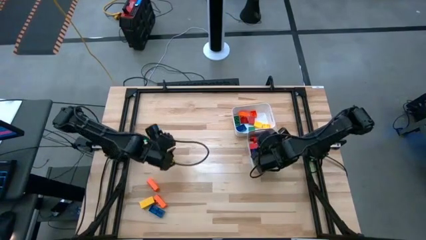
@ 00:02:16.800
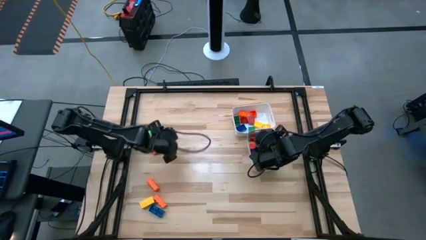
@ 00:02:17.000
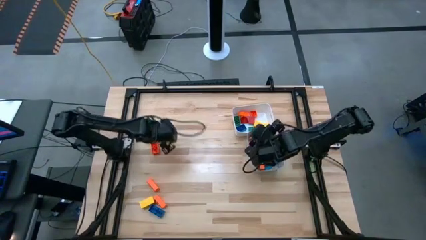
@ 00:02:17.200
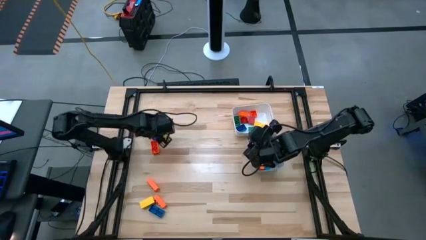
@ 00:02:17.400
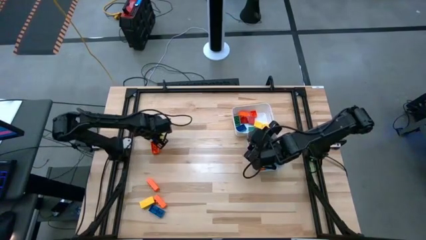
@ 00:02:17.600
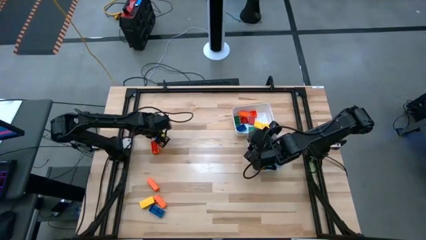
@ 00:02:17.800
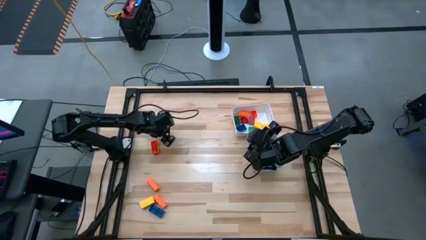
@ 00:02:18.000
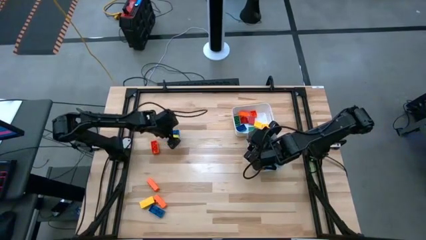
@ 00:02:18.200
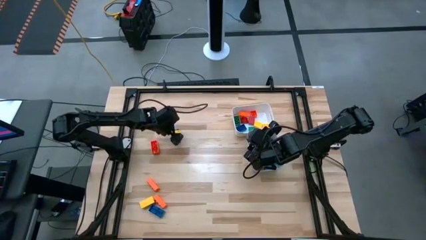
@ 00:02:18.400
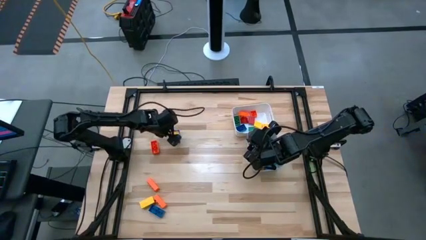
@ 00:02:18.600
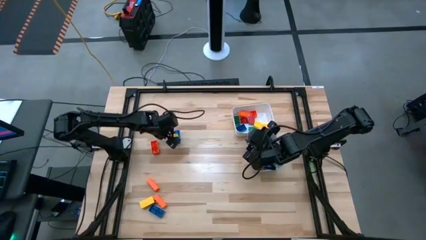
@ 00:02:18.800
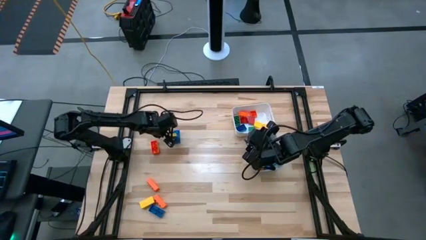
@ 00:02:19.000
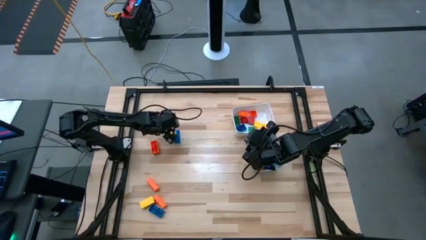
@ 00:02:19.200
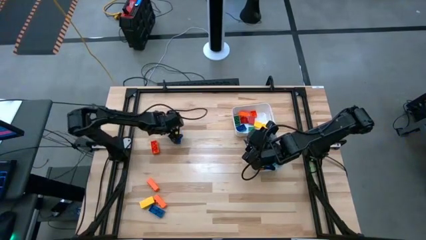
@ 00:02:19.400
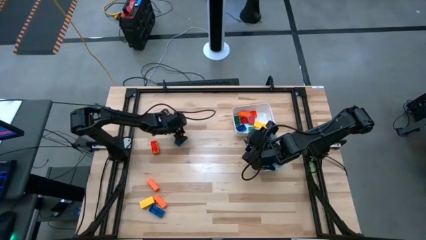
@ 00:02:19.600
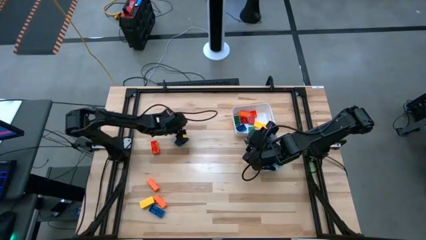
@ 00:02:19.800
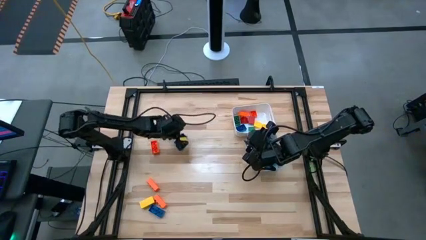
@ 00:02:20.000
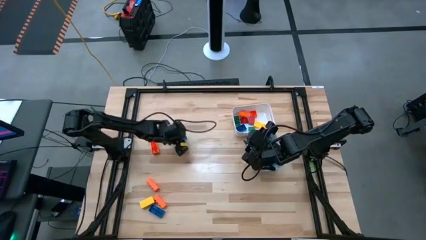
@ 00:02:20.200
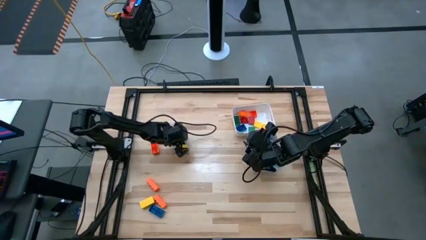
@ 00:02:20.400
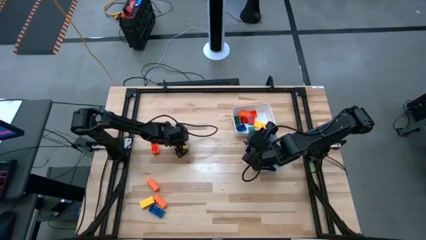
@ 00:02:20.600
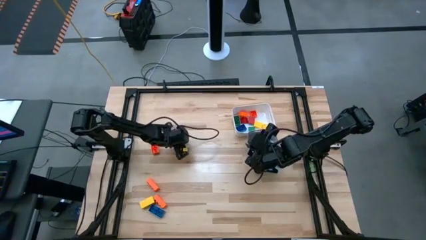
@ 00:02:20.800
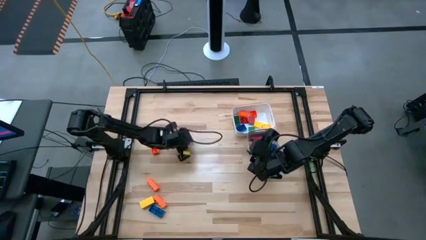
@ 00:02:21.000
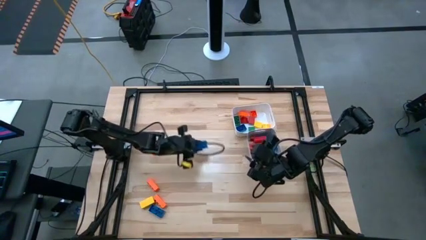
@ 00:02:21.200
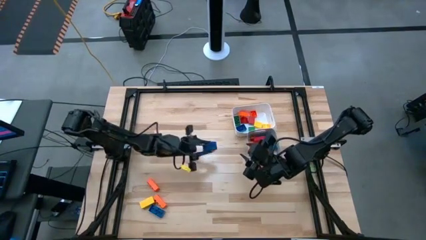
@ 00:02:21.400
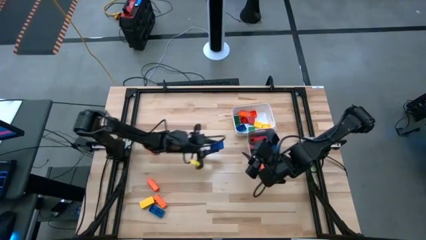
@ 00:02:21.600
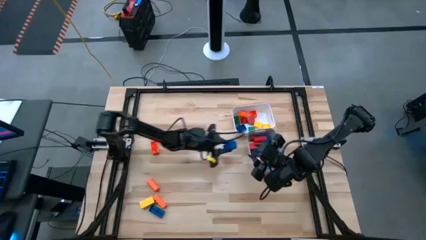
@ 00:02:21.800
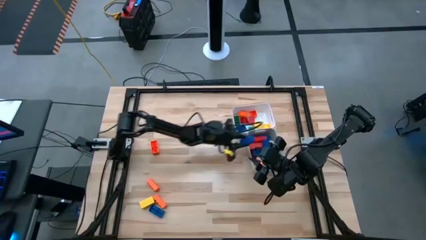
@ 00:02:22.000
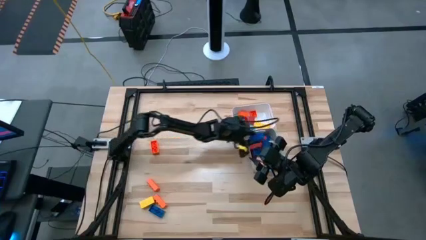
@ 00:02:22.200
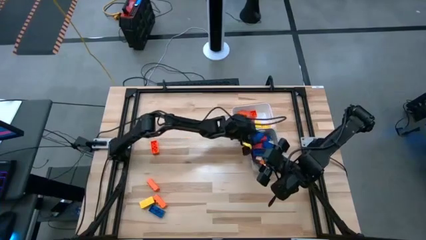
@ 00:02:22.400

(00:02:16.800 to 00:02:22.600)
Task: Sort blocks by size
Put the large blue game piece into the gray bin

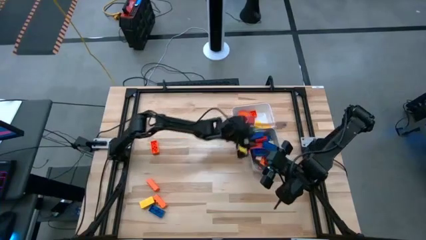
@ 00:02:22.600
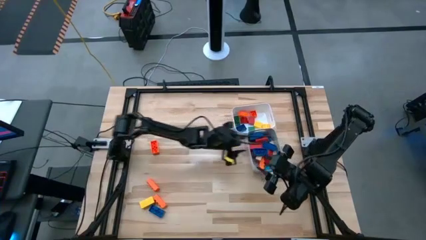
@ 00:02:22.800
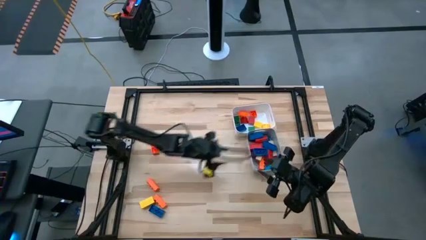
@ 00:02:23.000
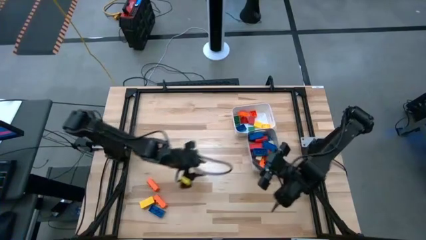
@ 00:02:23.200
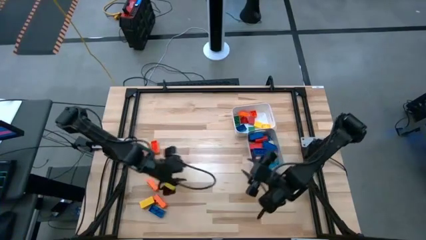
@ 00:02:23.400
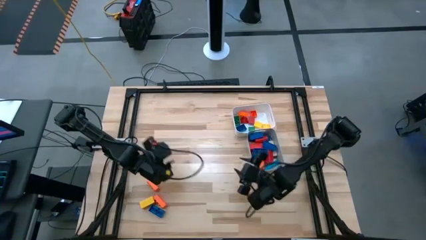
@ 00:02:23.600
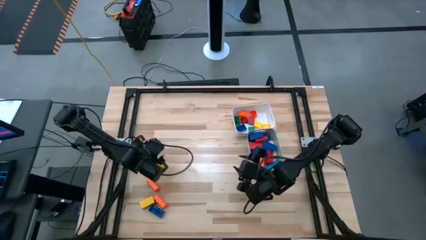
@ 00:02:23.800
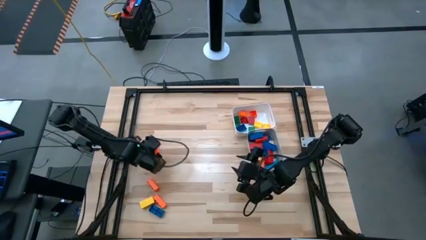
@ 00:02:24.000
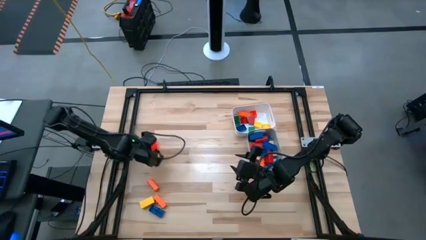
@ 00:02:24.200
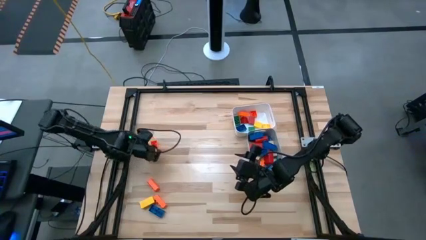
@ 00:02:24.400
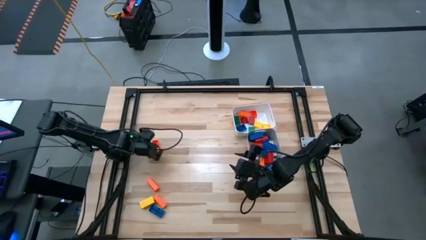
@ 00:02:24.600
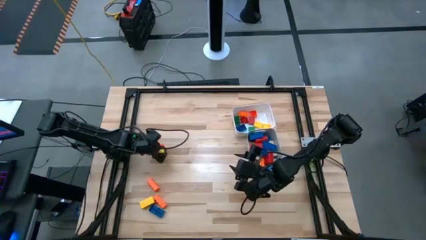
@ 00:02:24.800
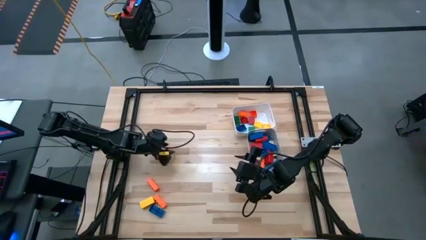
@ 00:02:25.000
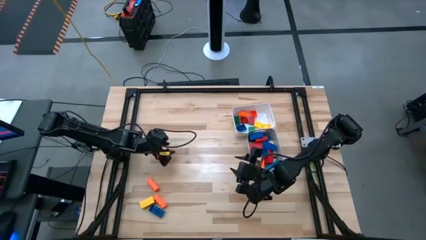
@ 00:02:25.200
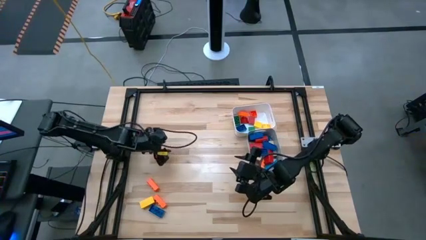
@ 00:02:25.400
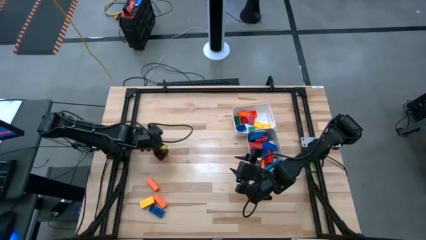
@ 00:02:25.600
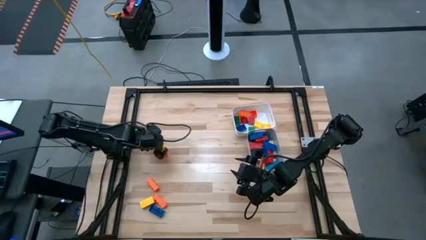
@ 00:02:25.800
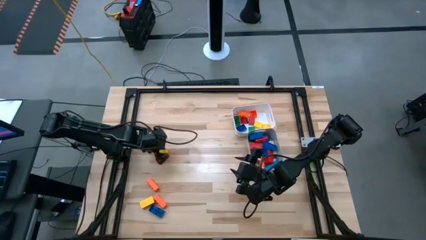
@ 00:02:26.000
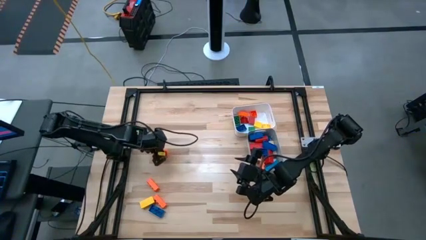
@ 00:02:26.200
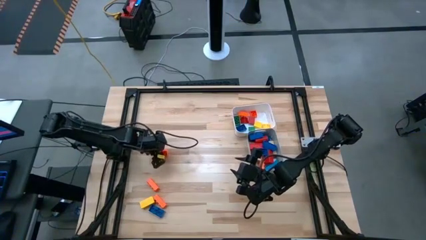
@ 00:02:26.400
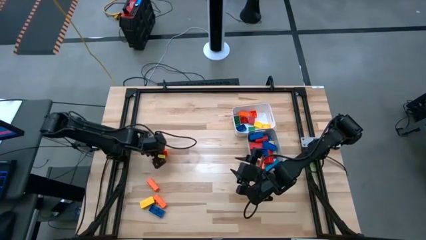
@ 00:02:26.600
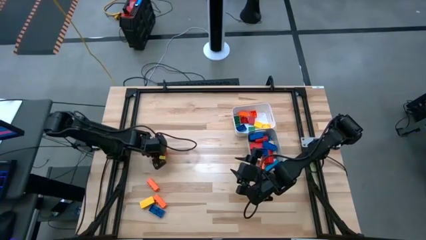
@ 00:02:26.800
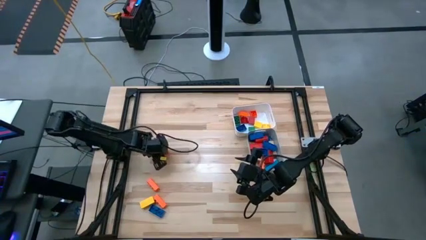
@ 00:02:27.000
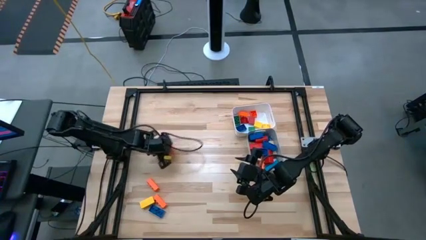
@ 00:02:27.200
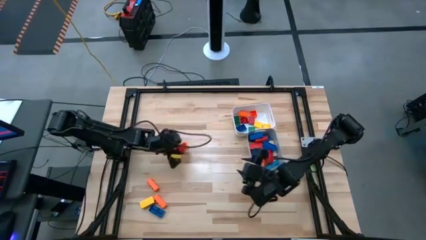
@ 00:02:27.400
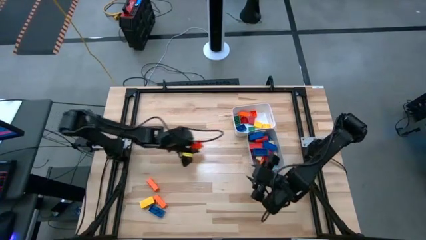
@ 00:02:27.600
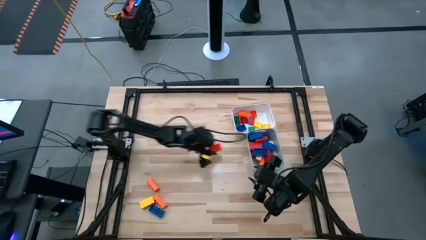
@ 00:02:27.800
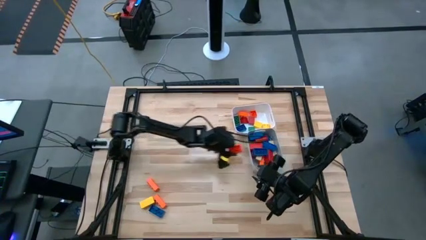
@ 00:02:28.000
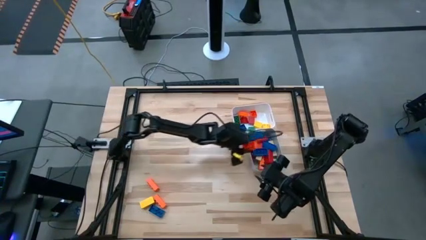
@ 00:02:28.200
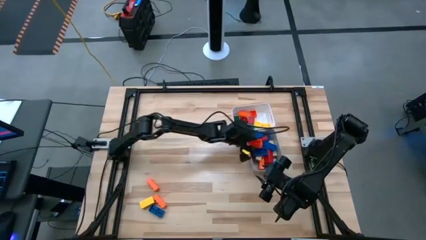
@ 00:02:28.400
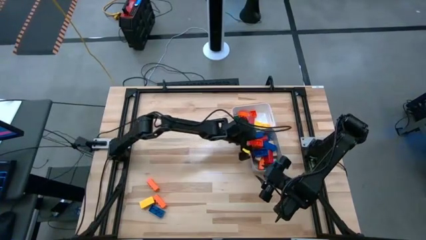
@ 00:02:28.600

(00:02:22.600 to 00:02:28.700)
Put the large orange game piece into the gray bin

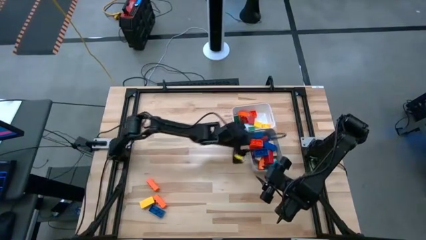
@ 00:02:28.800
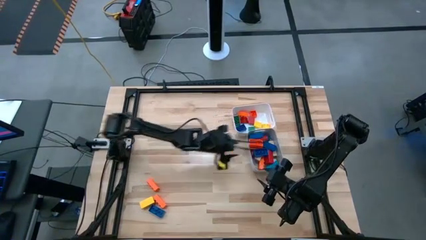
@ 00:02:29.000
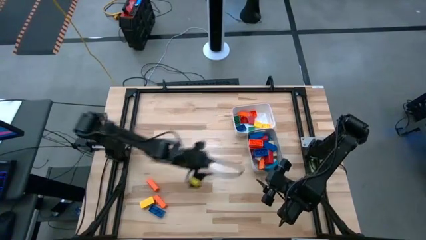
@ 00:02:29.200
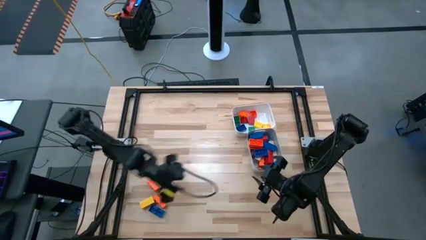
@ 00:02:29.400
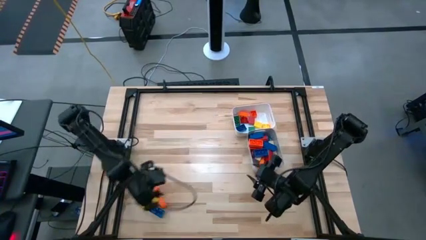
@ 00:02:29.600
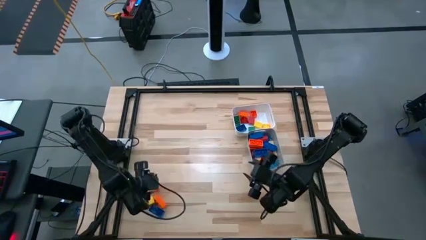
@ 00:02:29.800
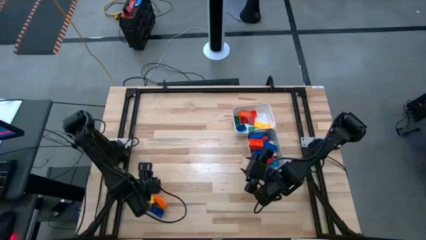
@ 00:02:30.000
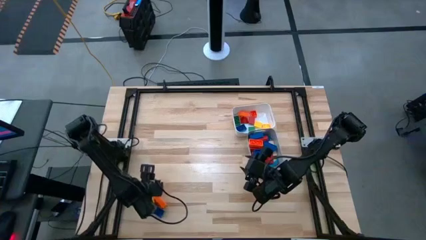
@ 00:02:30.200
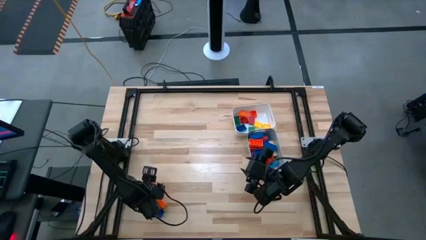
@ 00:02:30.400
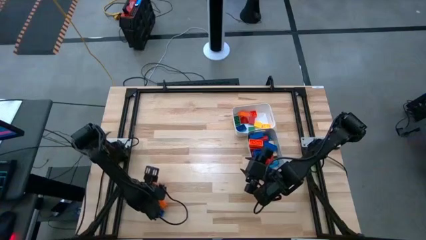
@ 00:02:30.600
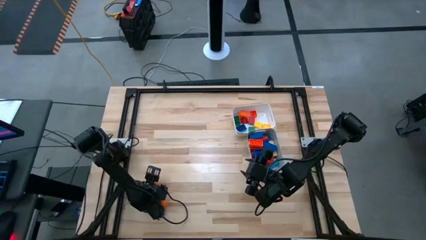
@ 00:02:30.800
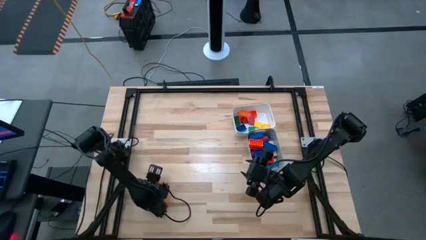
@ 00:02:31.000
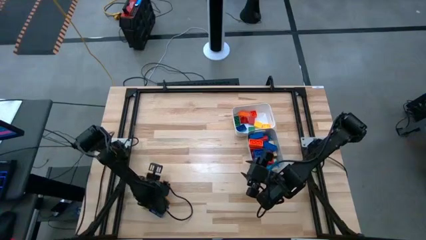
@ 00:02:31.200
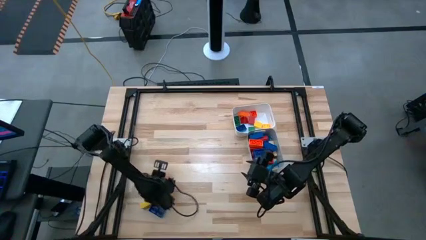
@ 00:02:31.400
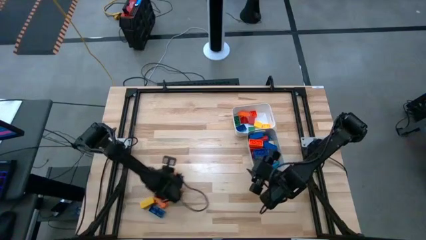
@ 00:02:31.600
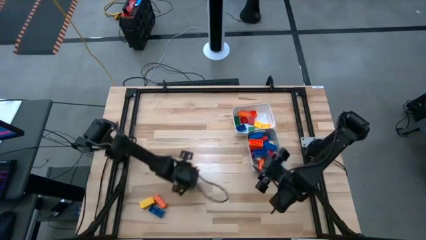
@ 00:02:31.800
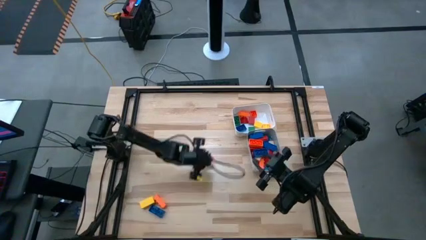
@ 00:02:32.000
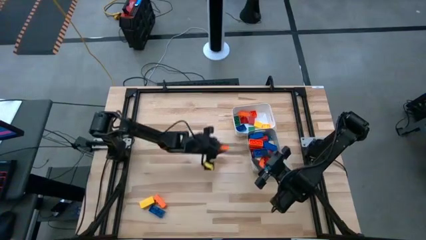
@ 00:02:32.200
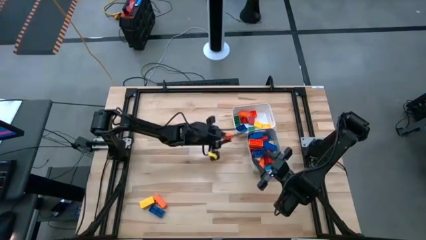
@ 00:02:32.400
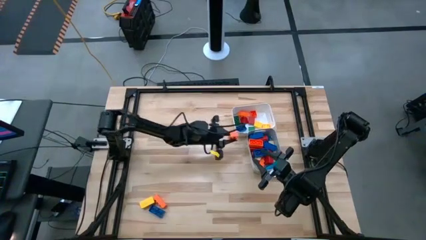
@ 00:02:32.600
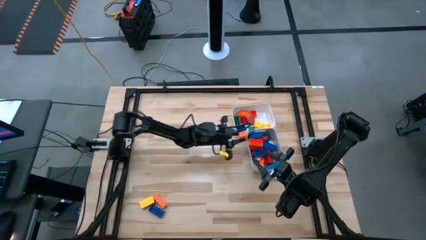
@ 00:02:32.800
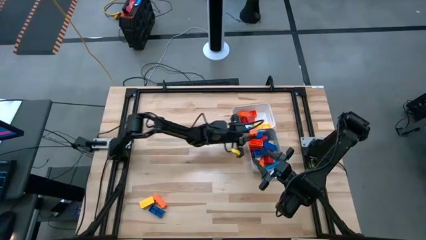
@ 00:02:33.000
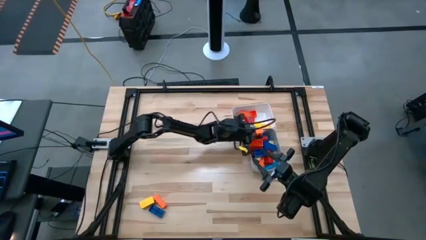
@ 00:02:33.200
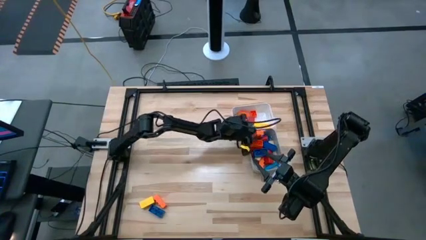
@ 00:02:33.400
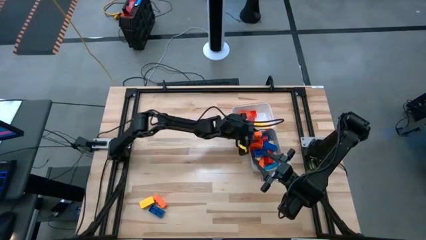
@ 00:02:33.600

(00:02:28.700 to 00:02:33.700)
Put the large orange game piece into the gray bin
